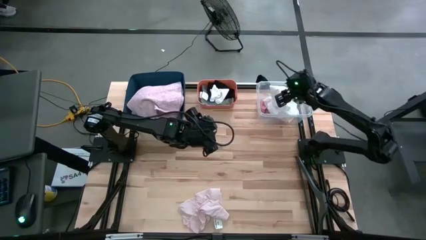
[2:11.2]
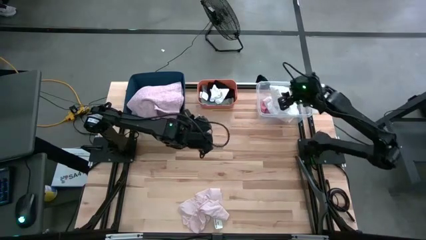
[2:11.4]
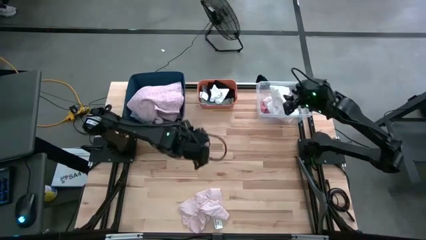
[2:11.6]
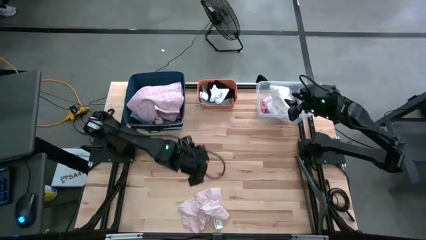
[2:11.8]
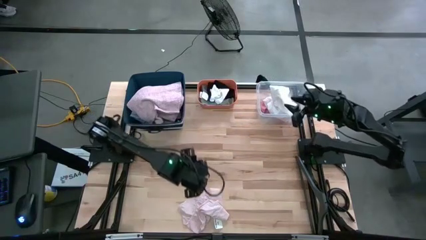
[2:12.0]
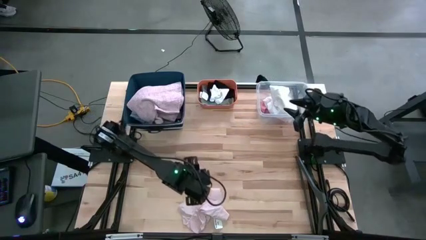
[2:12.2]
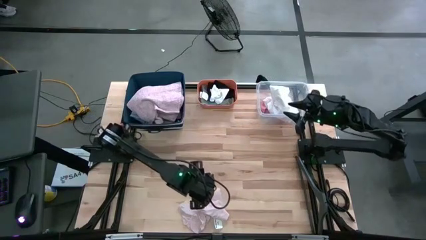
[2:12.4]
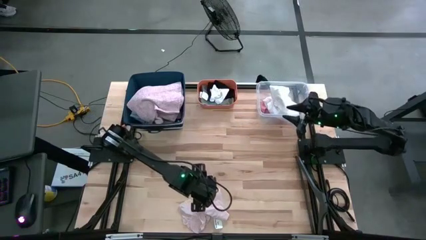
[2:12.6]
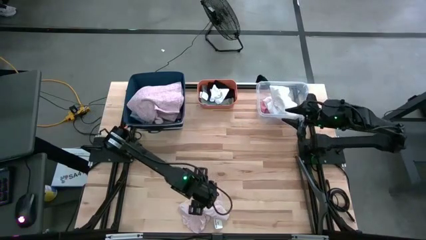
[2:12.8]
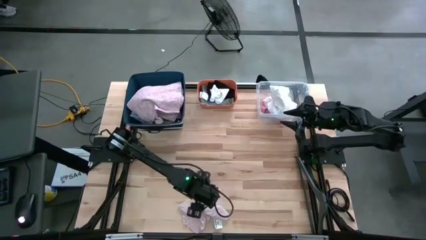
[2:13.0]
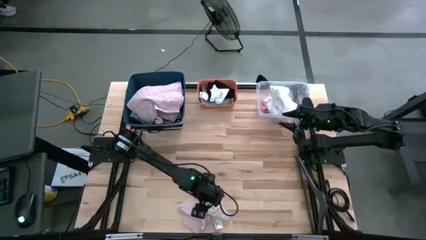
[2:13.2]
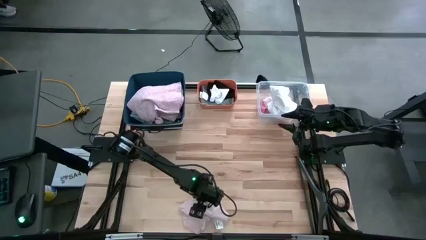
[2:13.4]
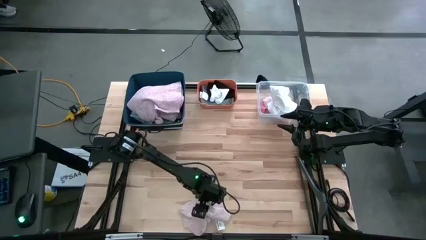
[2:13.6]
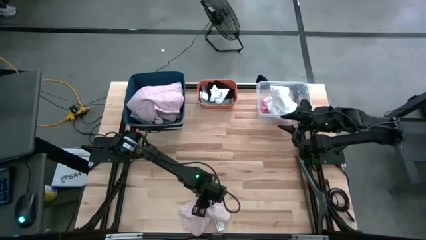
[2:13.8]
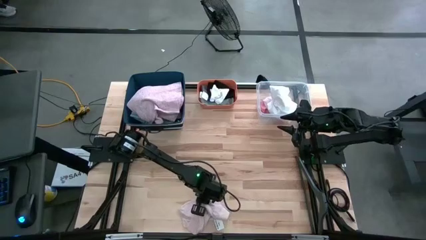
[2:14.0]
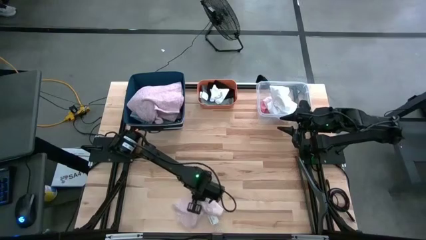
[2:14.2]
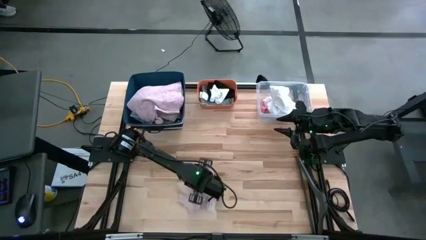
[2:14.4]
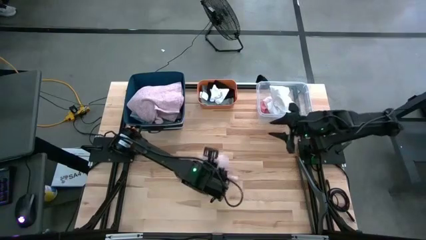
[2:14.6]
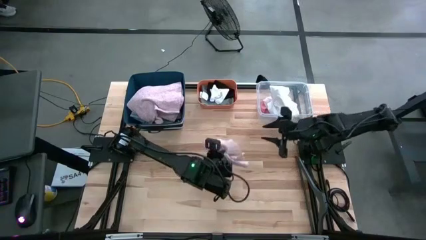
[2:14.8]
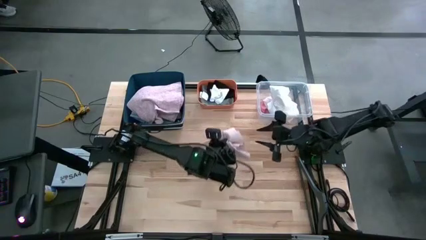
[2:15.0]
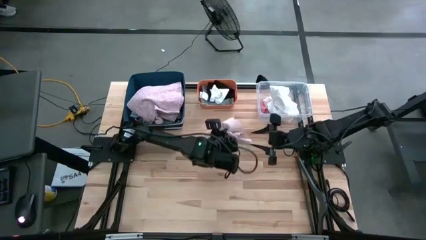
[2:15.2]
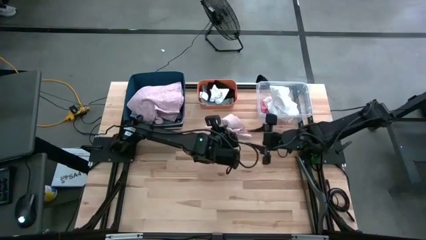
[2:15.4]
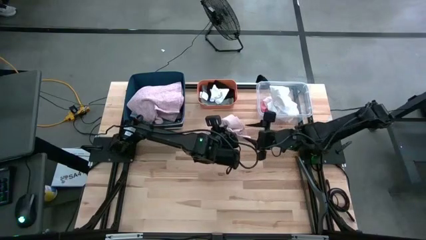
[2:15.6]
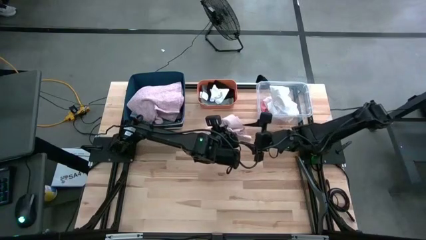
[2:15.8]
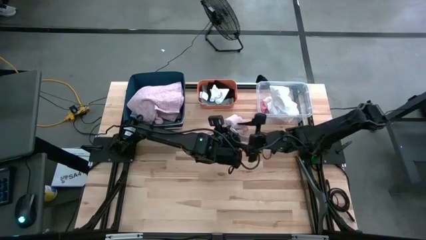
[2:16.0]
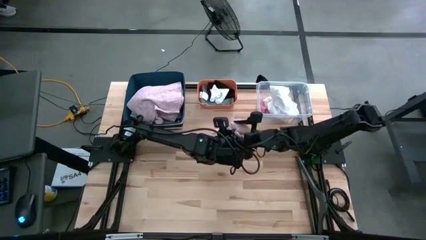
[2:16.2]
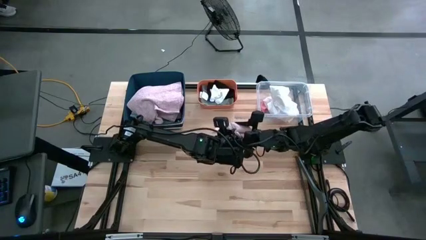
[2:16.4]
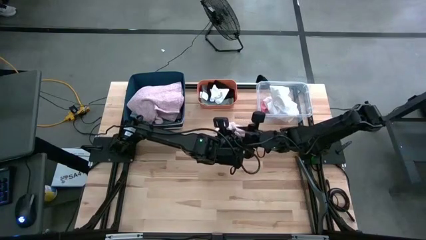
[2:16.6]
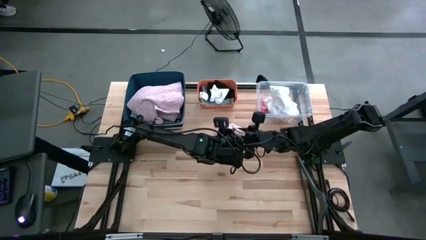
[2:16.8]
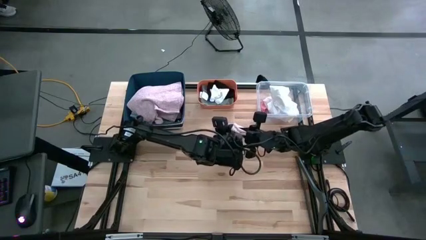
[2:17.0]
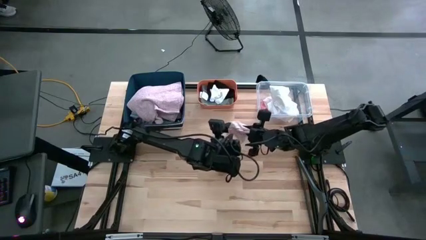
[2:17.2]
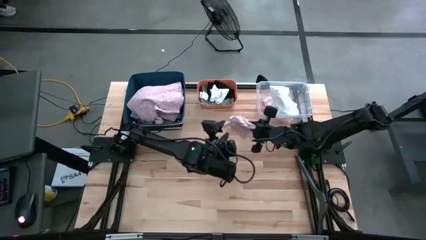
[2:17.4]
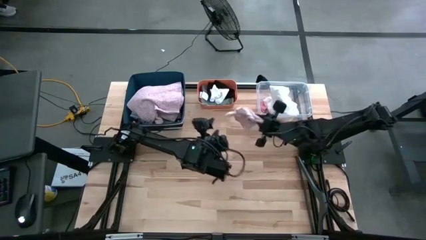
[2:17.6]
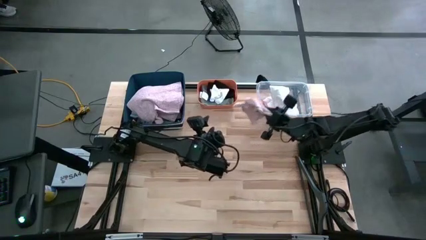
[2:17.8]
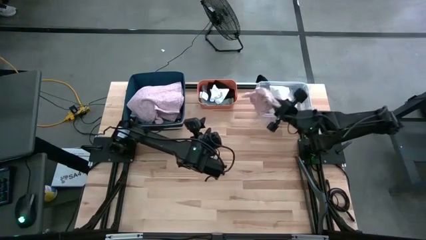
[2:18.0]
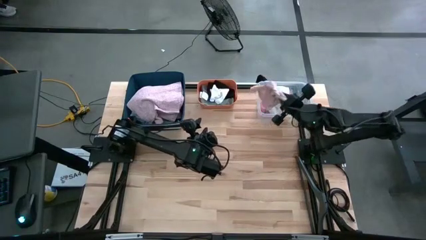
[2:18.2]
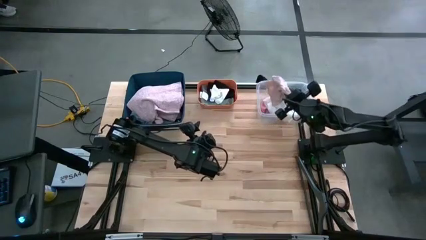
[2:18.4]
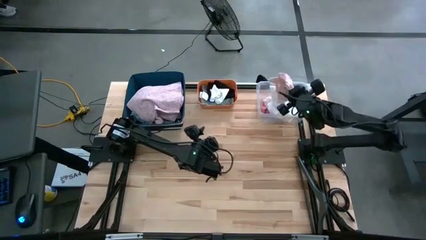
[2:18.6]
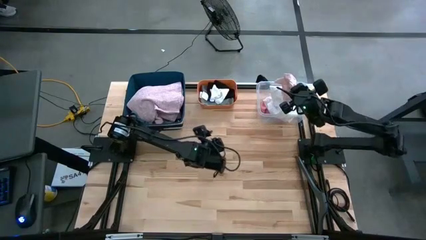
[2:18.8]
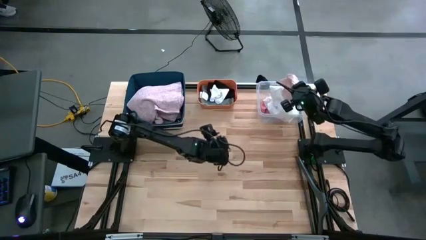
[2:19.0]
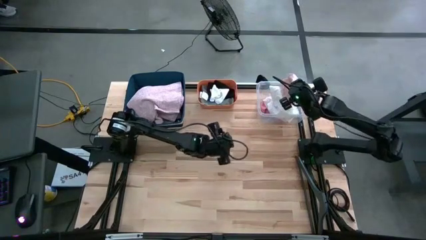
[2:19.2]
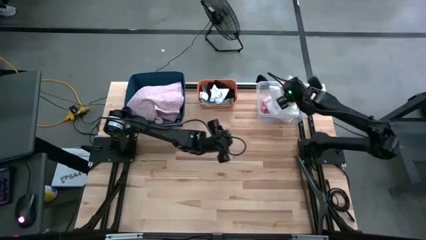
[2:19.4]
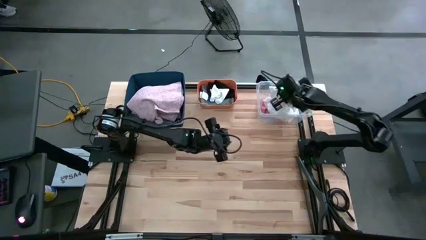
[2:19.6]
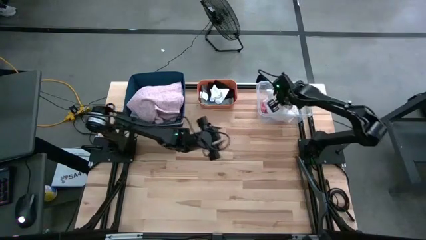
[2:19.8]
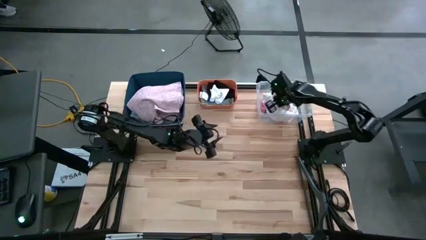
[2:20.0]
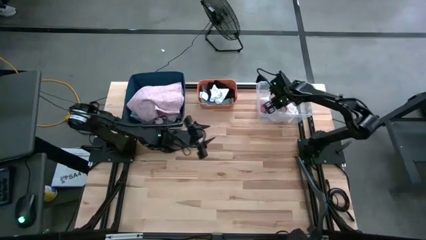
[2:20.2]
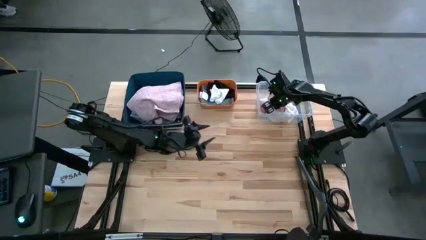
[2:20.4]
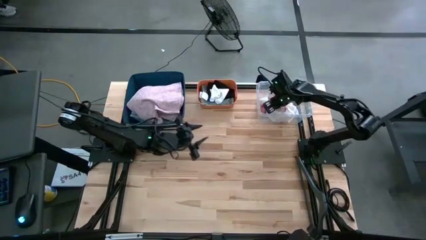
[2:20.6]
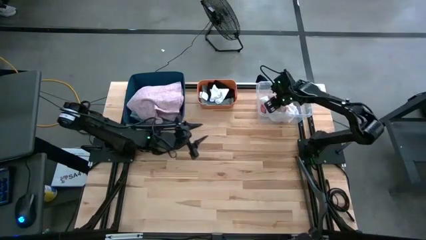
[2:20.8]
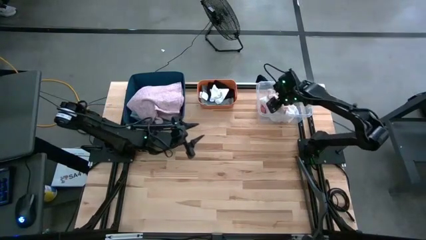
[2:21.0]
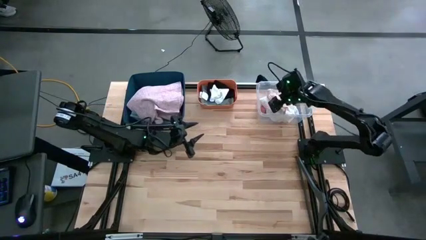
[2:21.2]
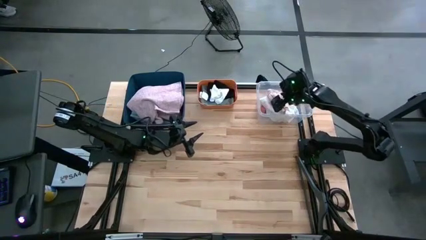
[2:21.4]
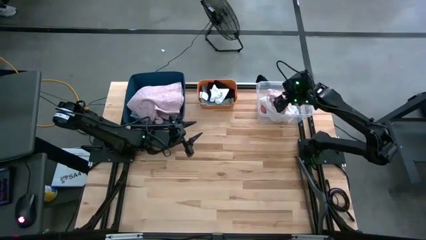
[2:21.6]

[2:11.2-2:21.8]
Task: Pick & Place Cloths
Put the light pink underwear into the transparent bin

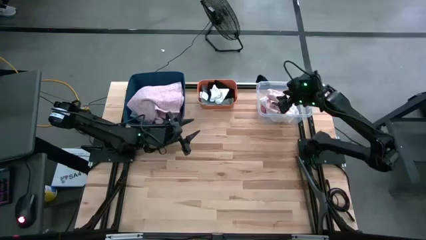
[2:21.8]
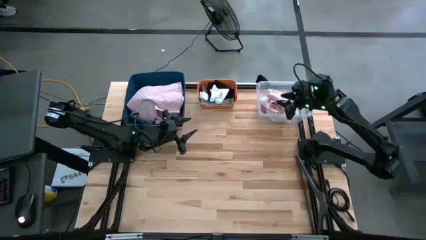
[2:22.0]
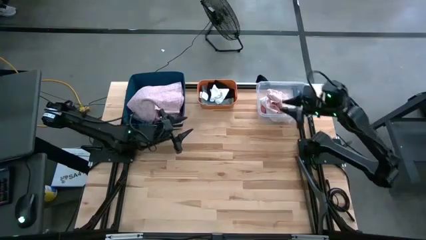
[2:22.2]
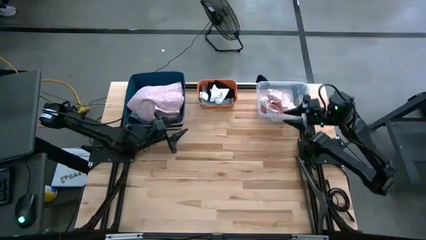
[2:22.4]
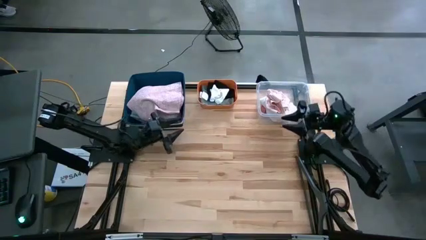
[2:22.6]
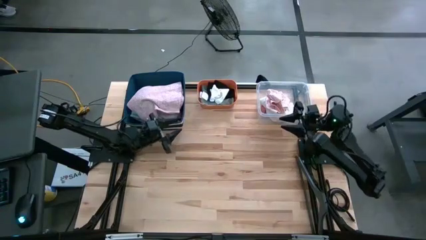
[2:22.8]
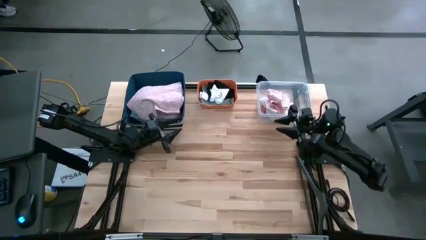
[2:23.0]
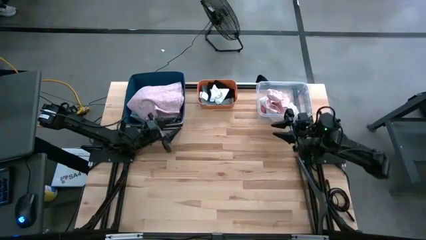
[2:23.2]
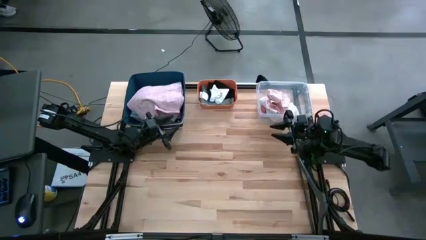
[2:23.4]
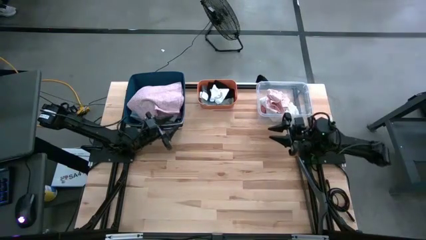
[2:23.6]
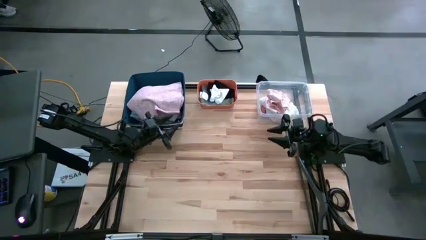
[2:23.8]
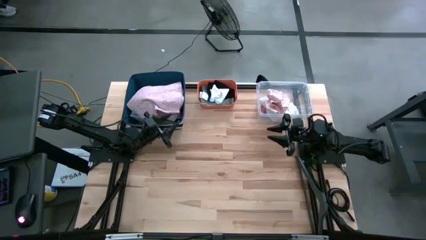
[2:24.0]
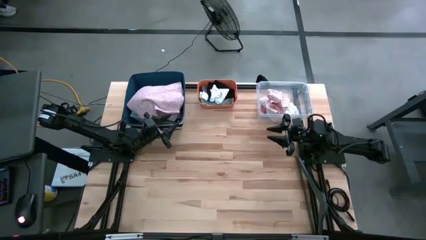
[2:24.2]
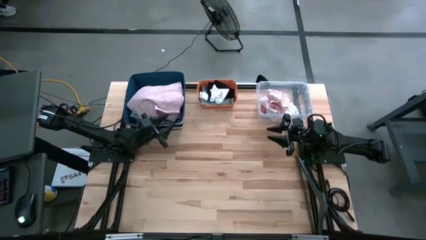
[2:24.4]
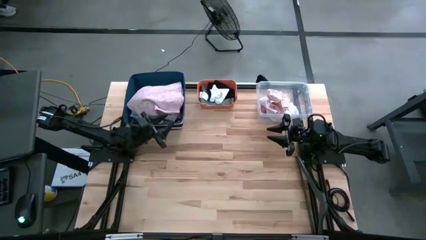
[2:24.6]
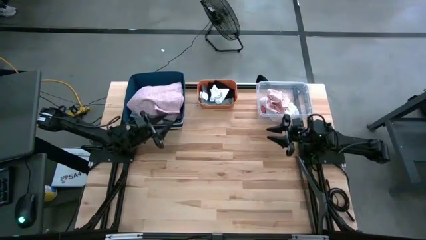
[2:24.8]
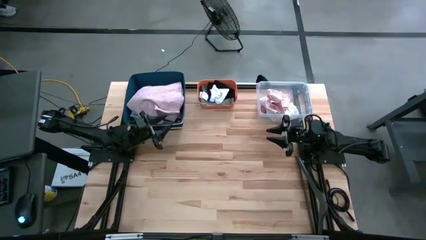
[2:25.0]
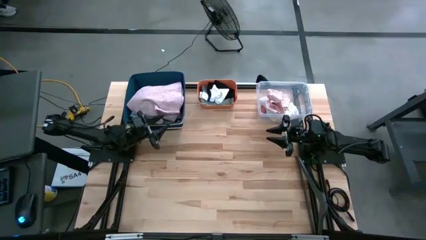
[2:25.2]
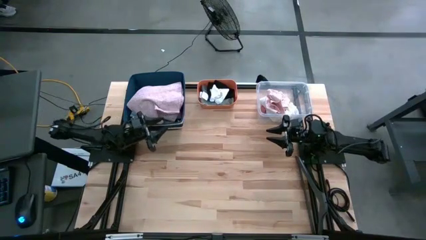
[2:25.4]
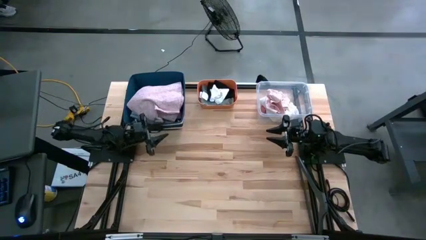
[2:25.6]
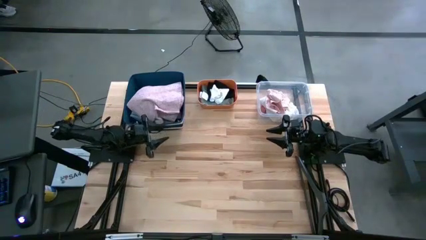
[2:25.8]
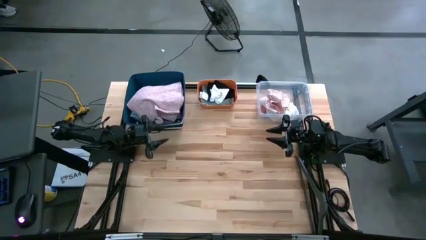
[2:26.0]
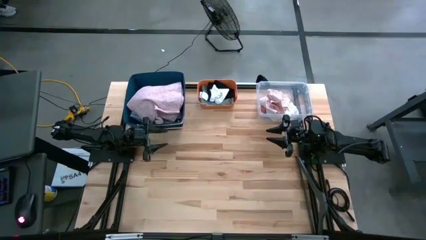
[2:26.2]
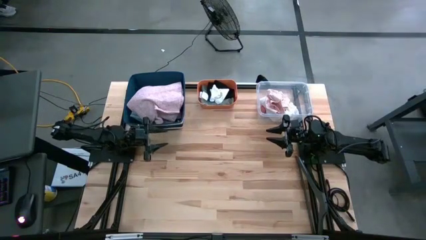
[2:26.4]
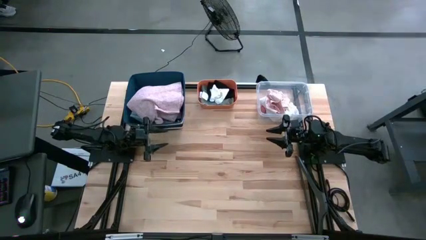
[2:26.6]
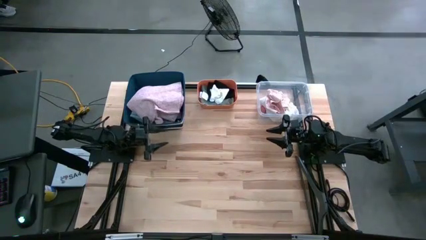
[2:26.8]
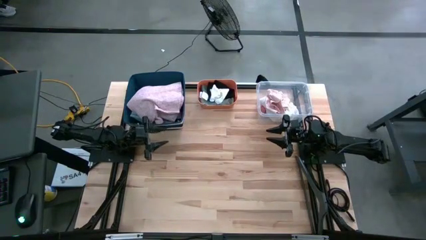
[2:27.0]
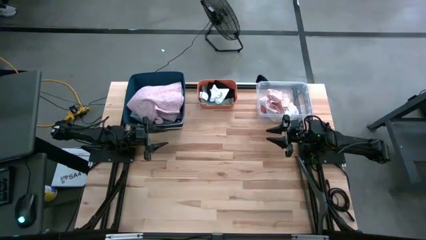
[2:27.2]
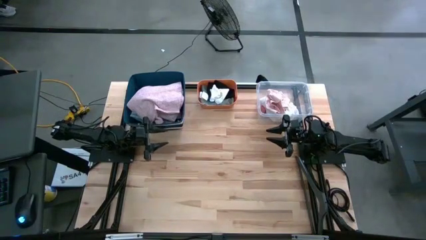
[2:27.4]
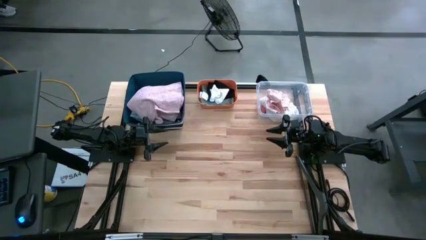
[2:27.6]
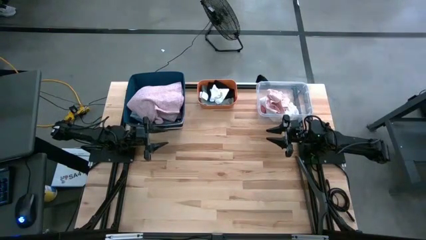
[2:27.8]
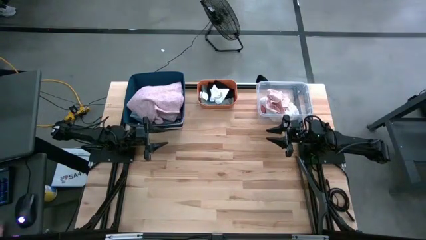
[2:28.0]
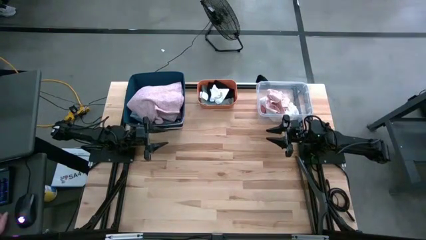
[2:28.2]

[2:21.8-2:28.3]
Return to Home Position
